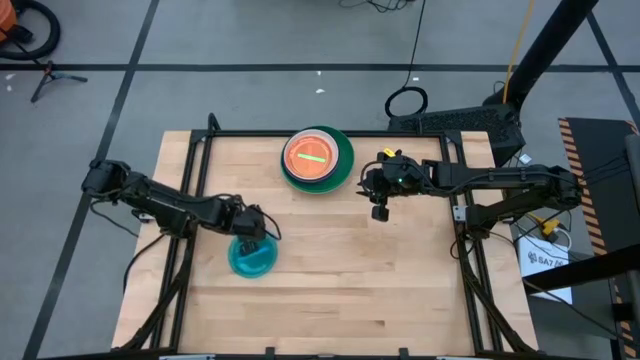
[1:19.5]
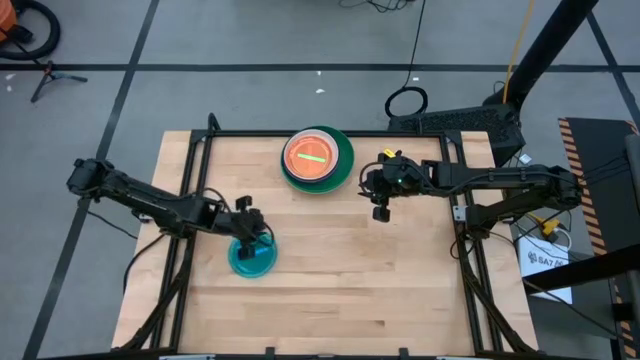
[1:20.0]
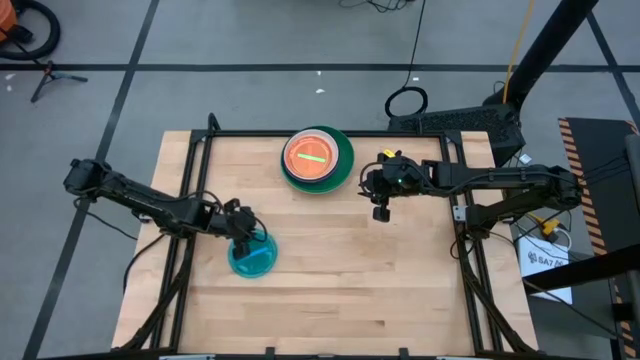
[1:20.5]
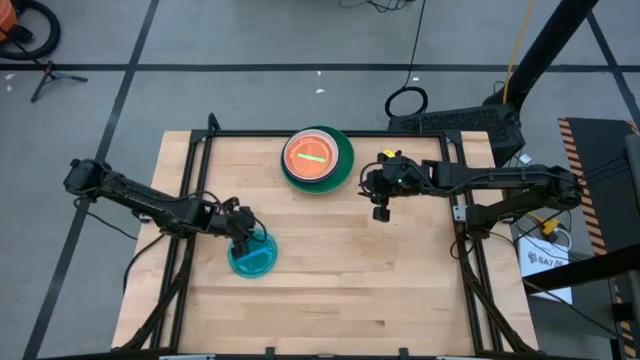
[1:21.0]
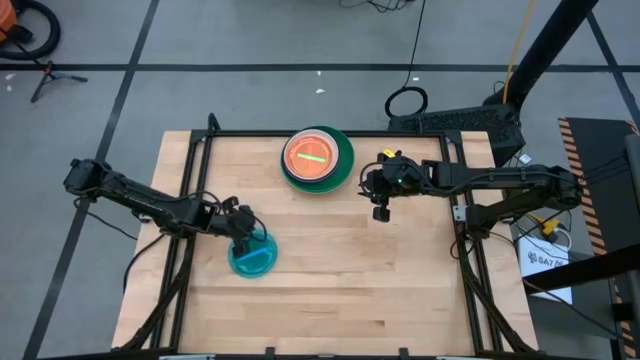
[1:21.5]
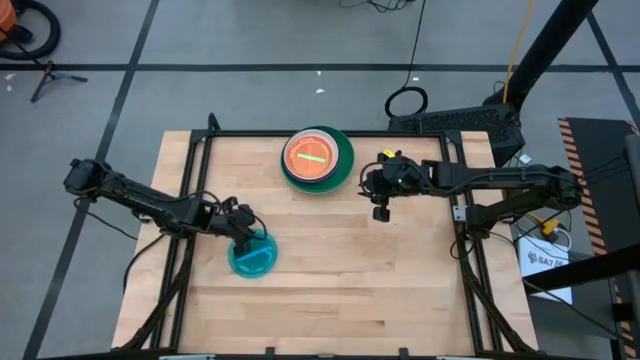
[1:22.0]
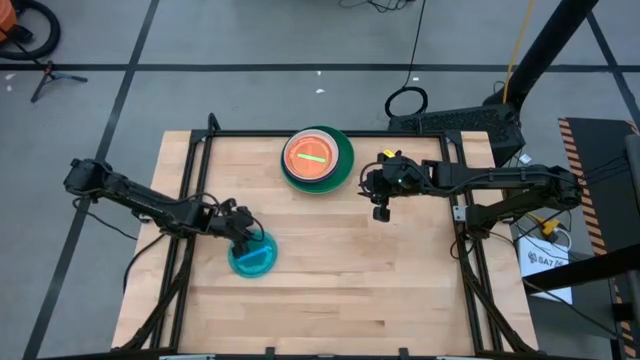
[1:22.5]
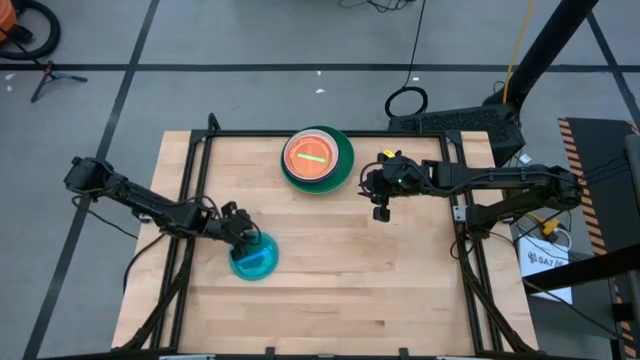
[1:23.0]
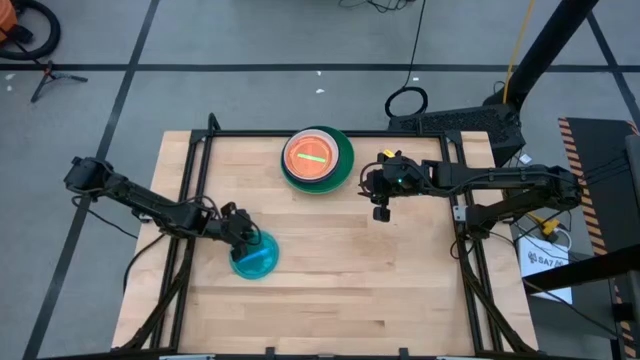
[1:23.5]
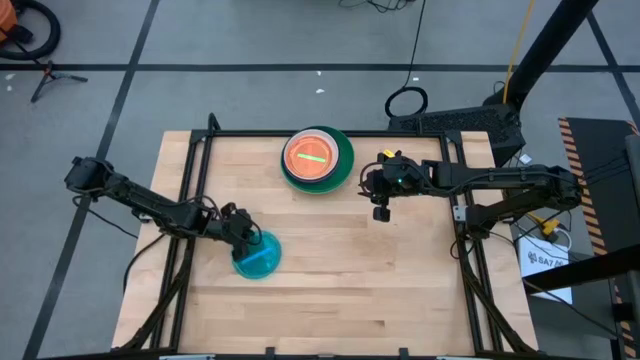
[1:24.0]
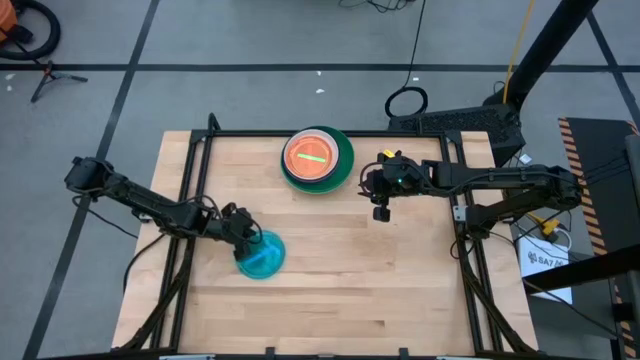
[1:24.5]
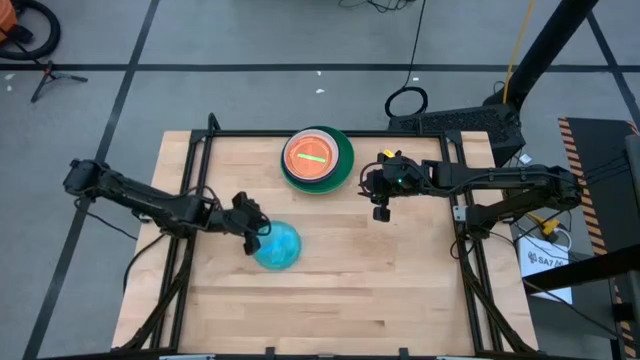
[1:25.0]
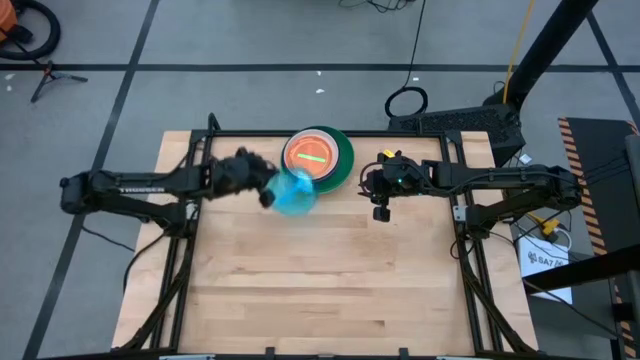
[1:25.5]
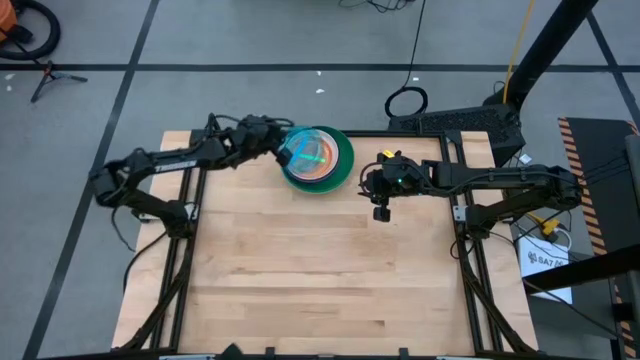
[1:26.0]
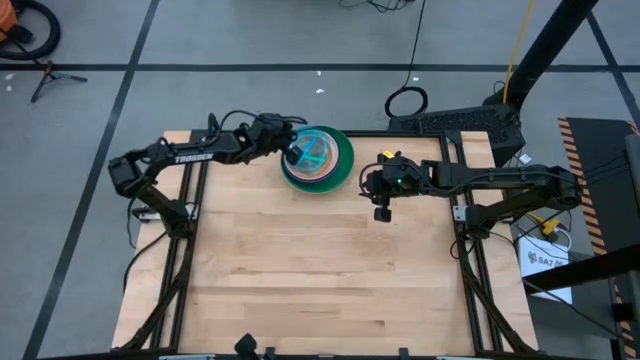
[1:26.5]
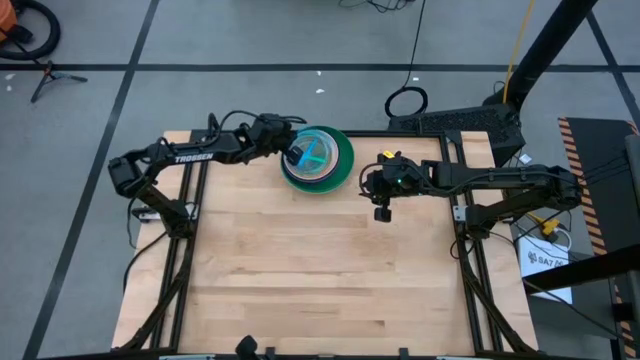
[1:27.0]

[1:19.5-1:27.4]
Task: Stack plastic plates
Stack the light blue plate on top of the light green plate

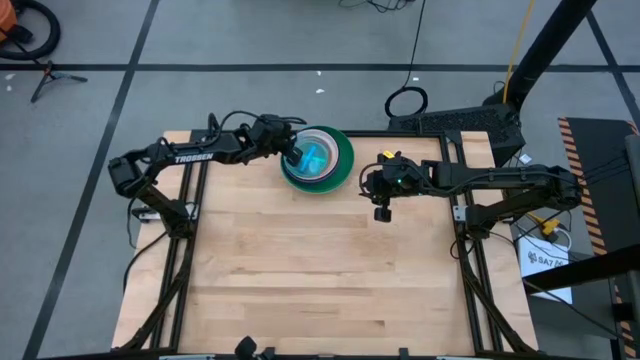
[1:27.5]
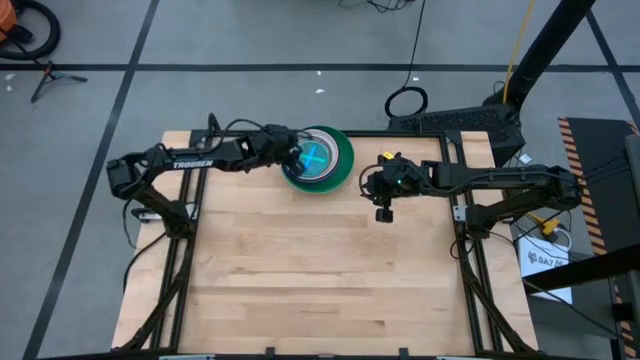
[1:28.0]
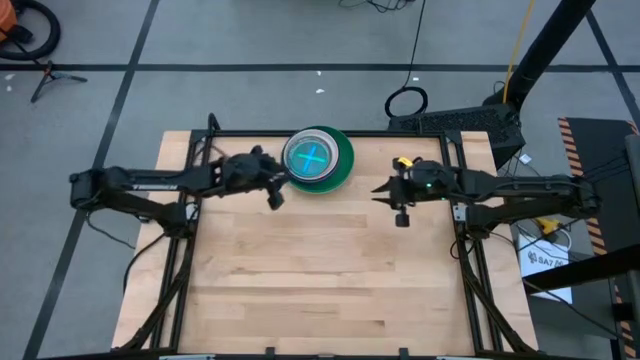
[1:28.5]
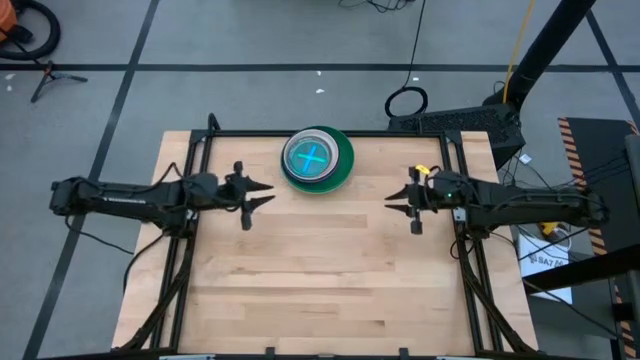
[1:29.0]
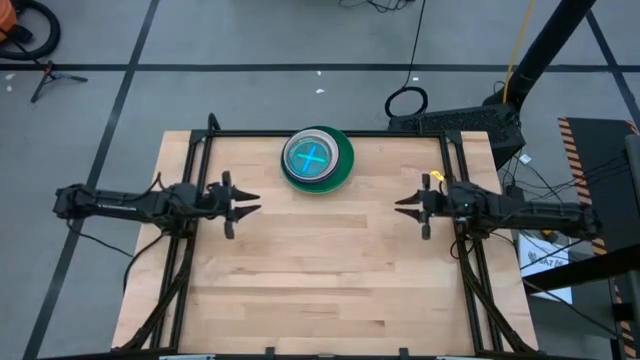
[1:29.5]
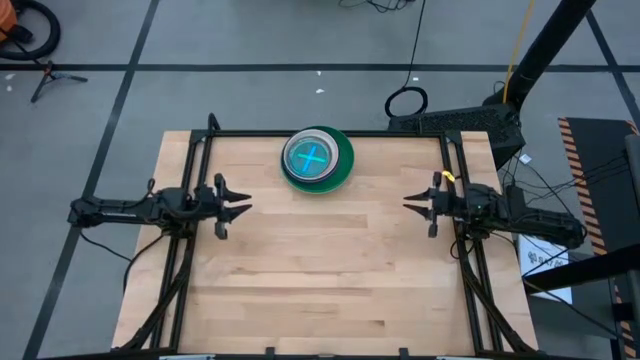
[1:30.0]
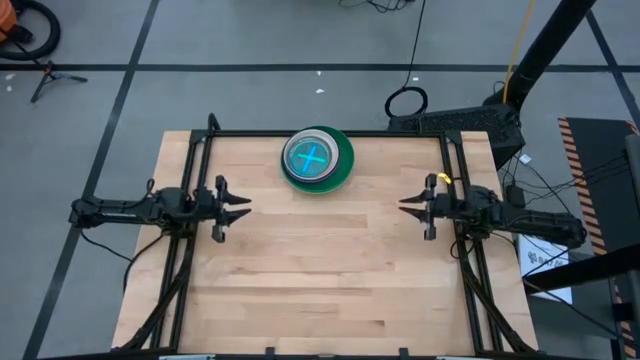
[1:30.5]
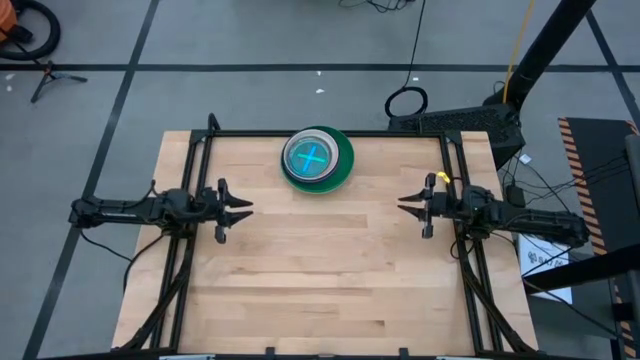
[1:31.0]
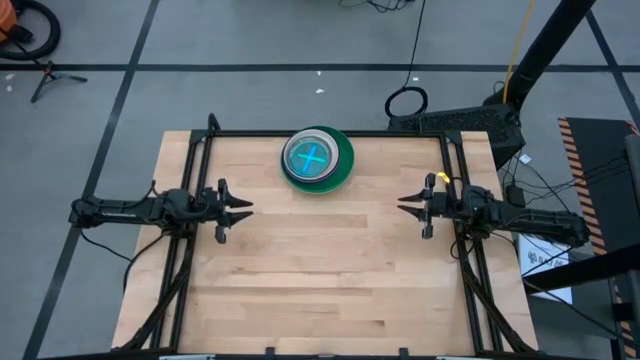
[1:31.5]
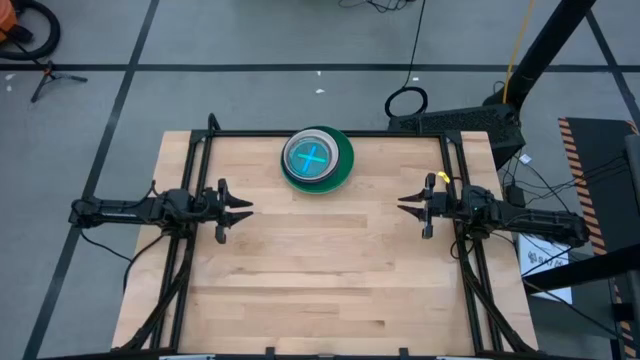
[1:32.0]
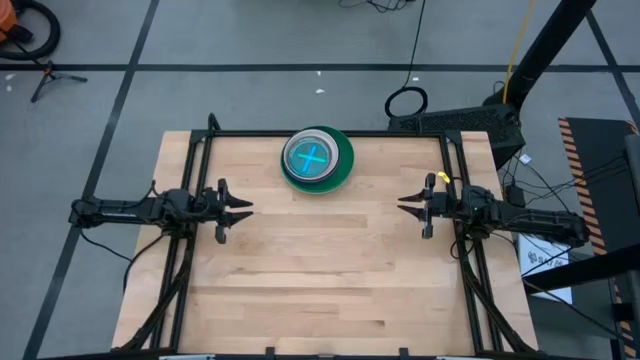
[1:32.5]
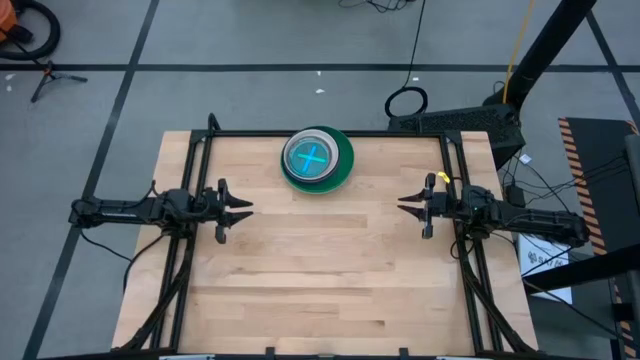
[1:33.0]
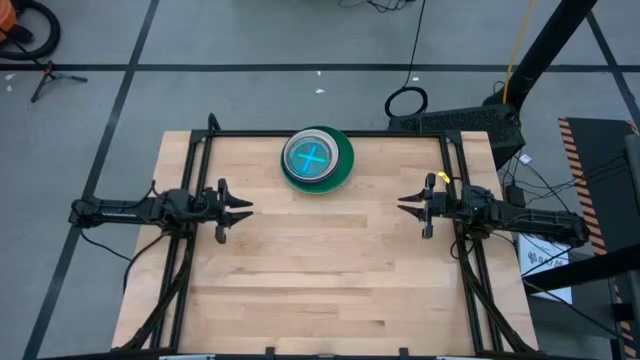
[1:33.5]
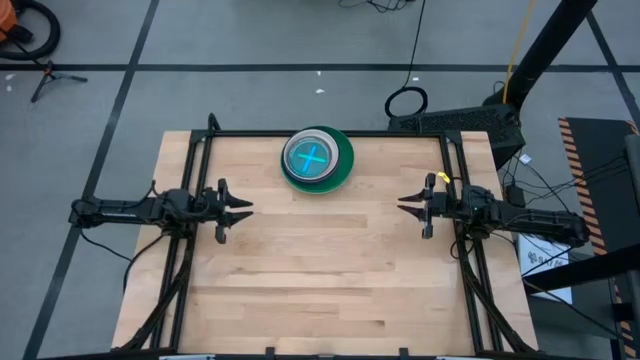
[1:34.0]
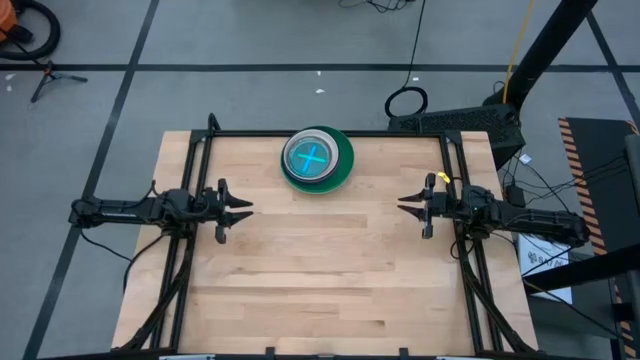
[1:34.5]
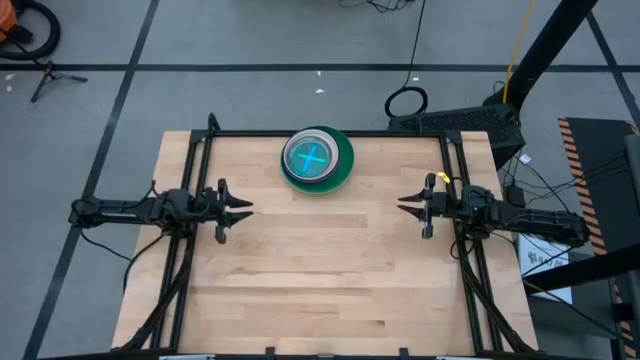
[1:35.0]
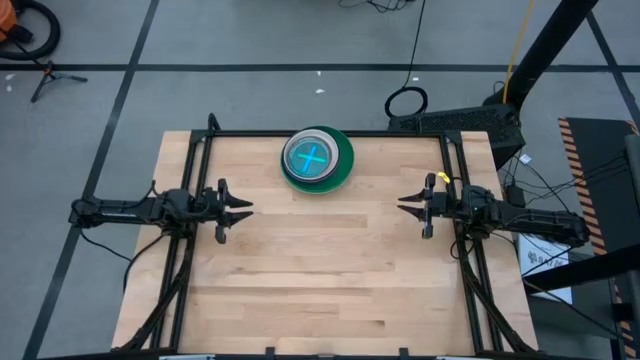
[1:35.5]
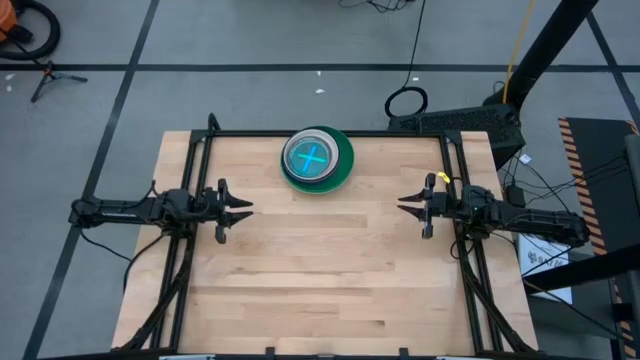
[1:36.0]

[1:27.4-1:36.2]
Return to Home Position

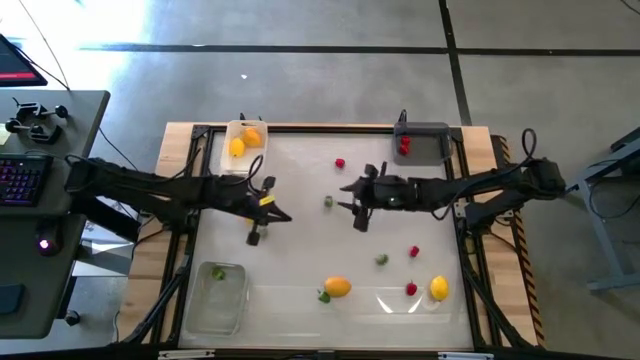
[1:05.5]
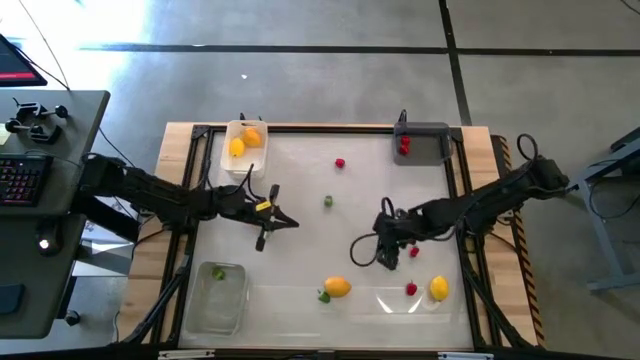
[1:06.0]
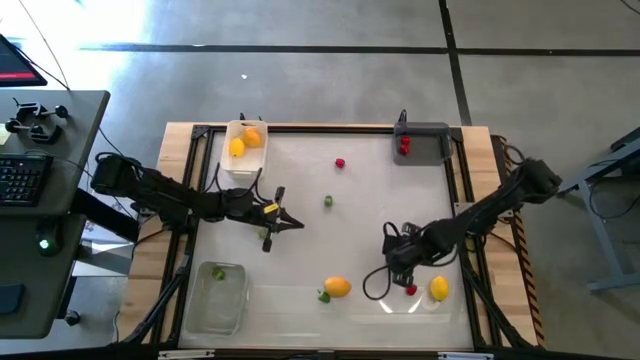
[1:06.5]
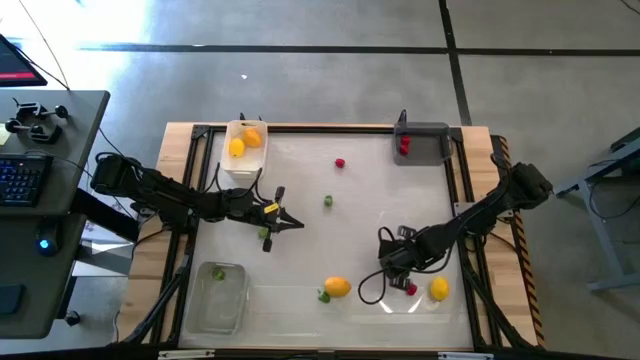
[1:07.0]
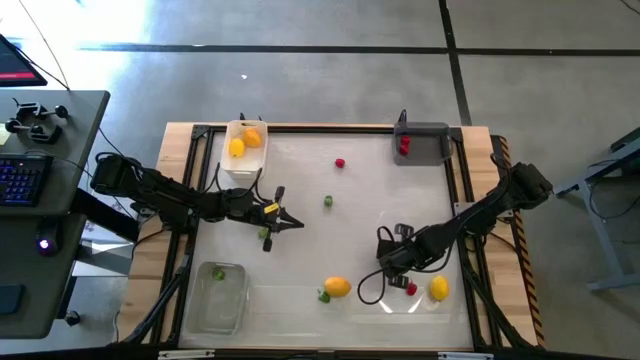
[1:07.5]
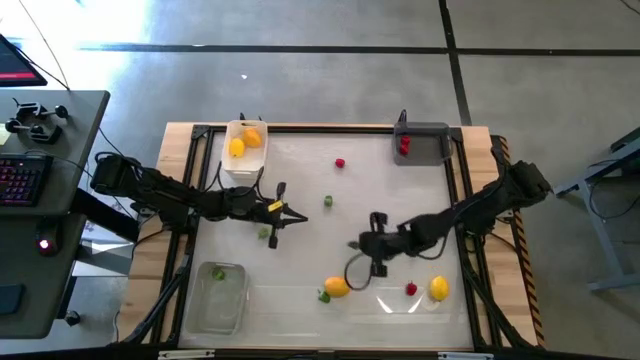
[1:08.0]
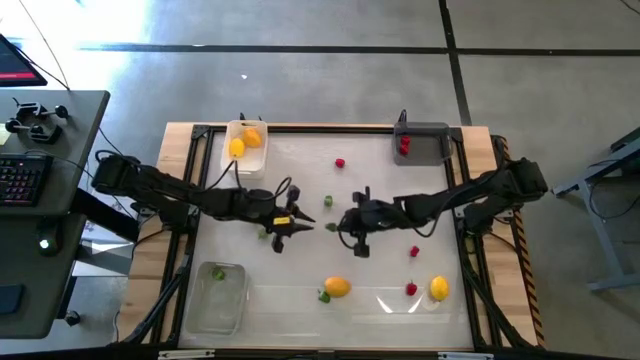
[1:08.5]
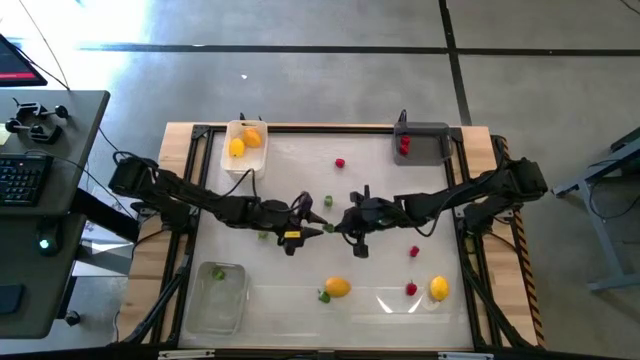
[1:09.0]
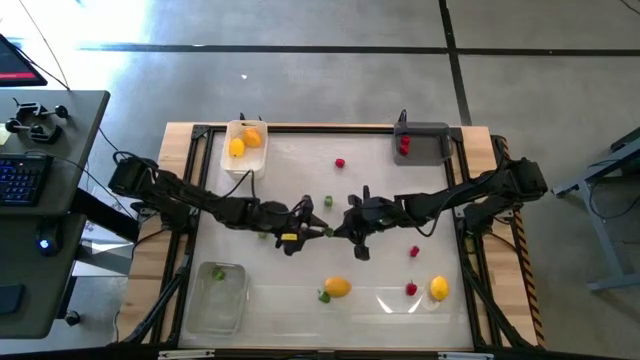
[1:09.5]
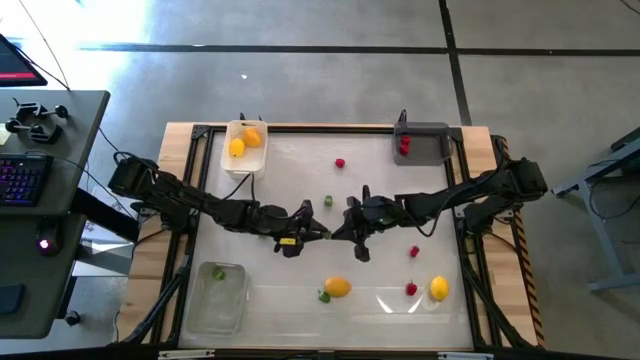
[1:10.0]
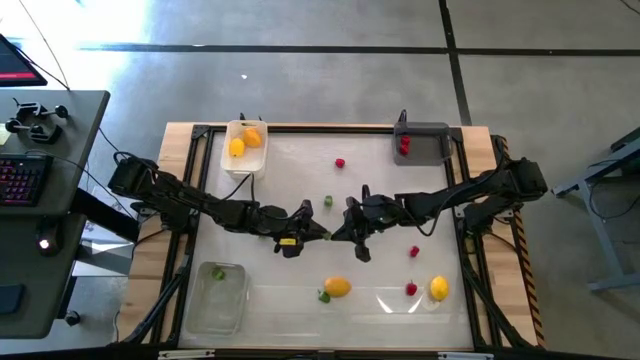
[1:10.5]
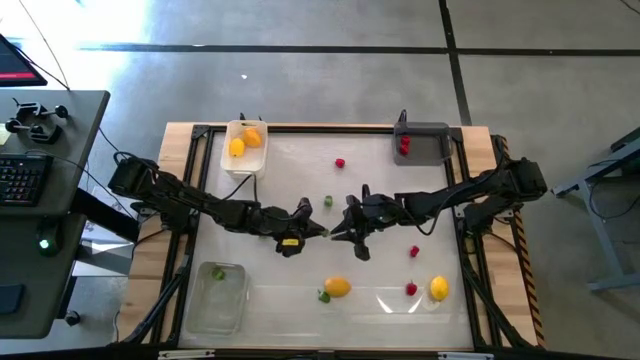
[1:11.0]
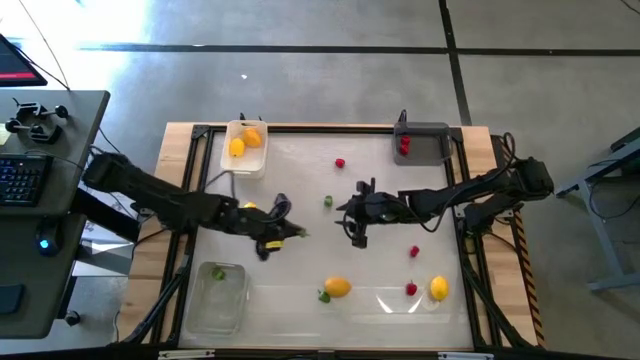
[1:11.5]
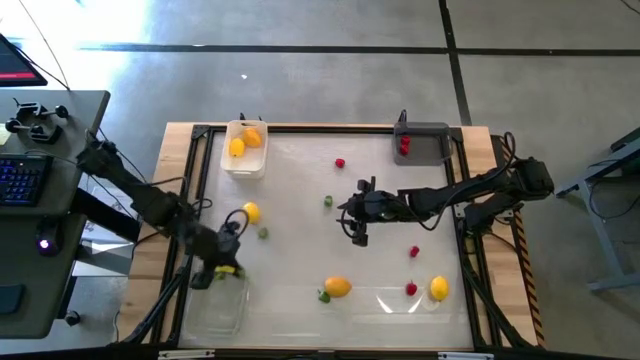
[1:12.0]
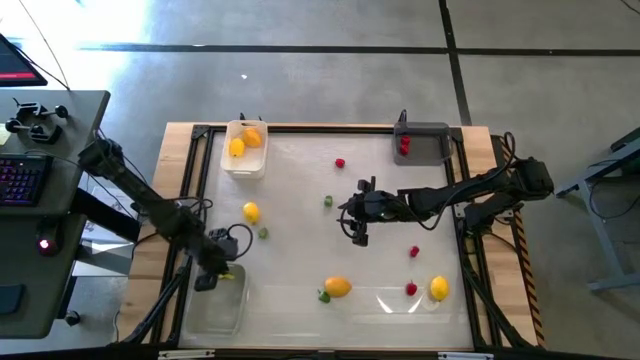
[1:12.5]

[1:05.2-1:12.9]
Task: Sort produce into baskets
Put the green bell pepper into the gray bin
